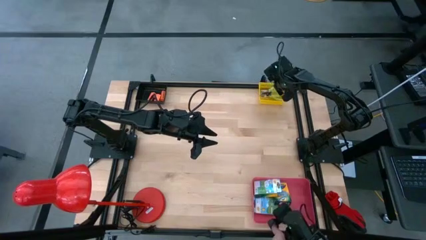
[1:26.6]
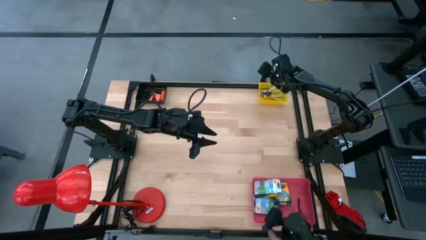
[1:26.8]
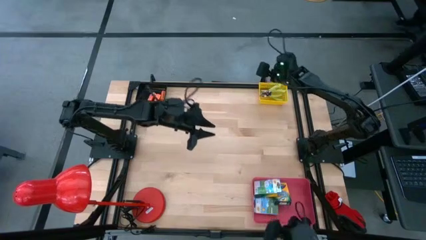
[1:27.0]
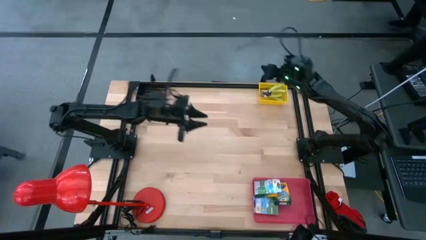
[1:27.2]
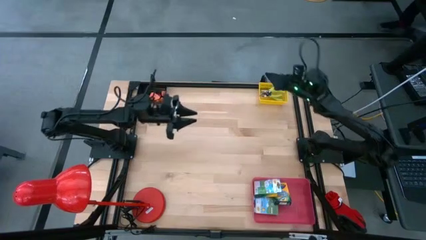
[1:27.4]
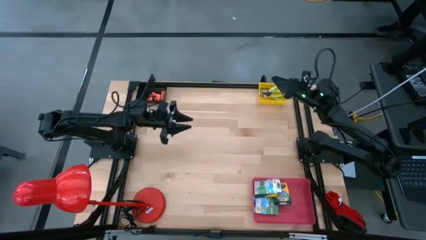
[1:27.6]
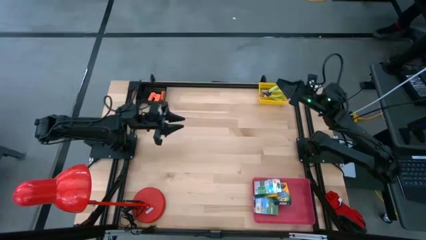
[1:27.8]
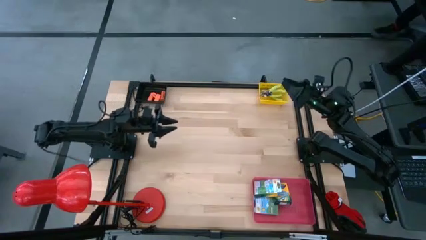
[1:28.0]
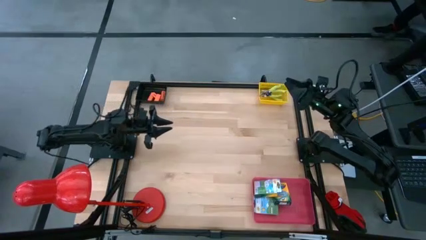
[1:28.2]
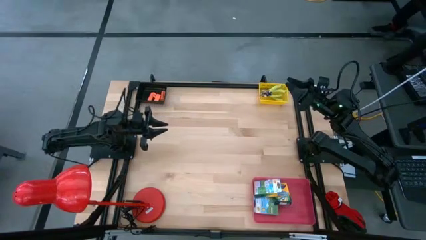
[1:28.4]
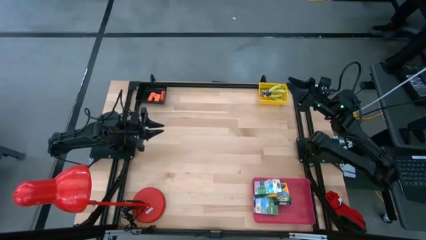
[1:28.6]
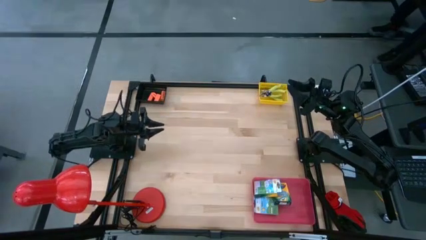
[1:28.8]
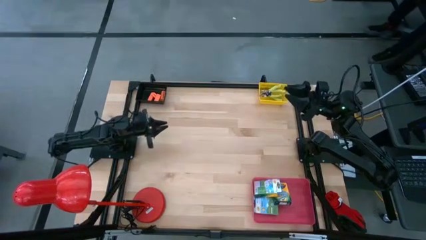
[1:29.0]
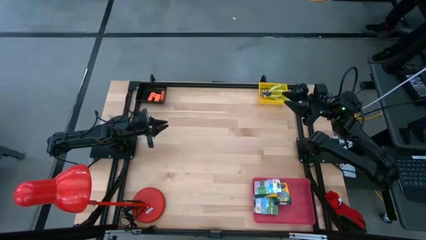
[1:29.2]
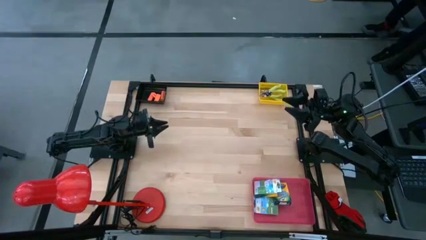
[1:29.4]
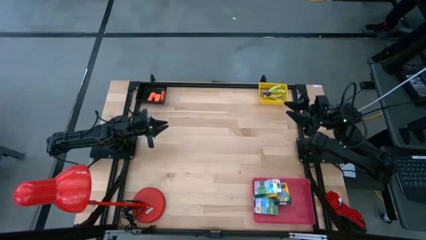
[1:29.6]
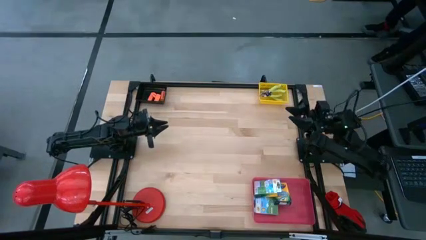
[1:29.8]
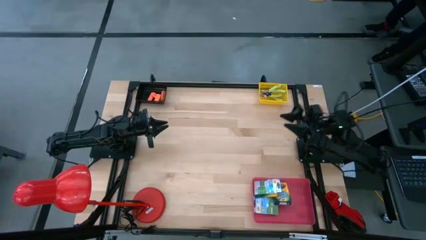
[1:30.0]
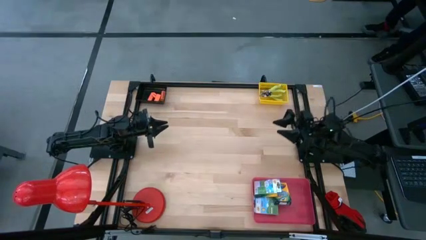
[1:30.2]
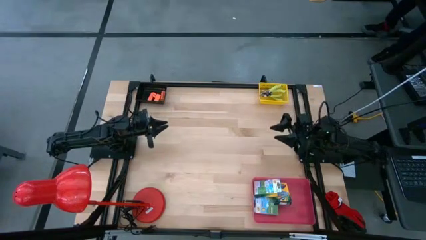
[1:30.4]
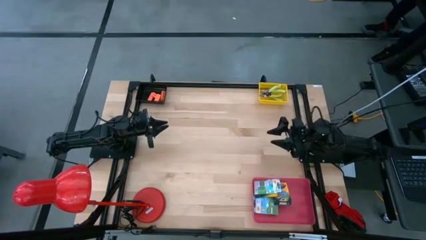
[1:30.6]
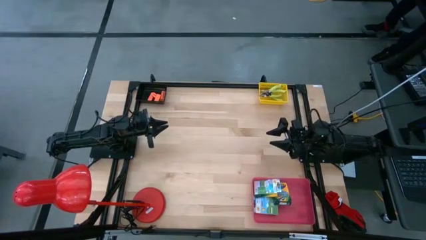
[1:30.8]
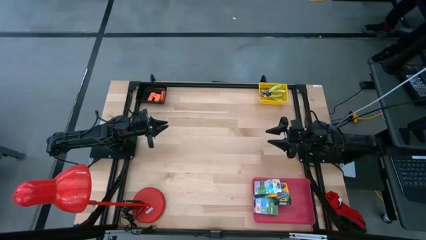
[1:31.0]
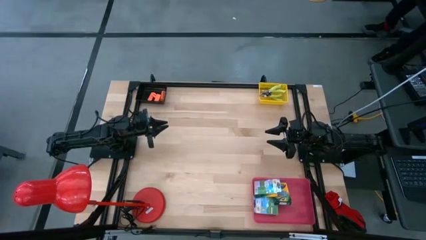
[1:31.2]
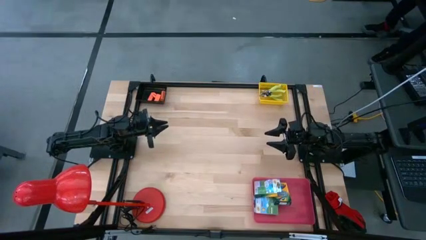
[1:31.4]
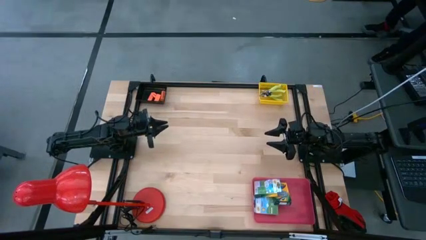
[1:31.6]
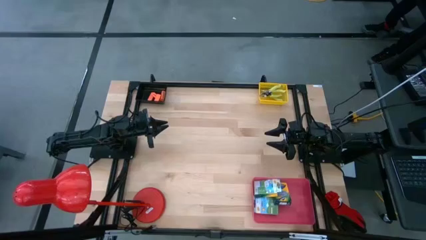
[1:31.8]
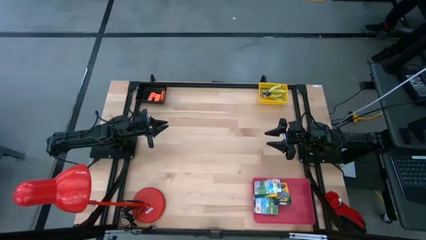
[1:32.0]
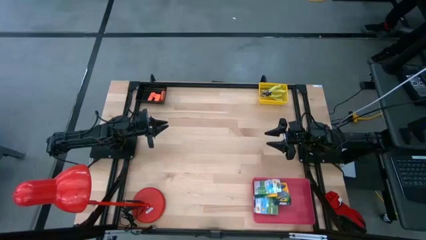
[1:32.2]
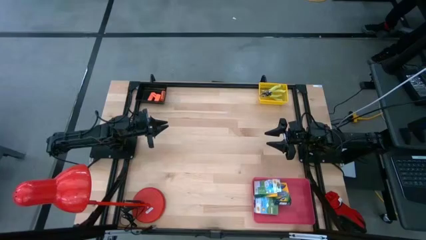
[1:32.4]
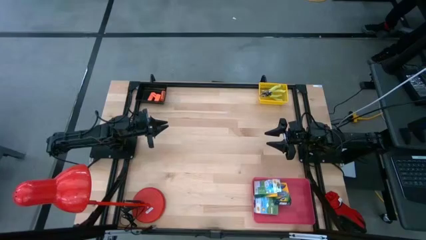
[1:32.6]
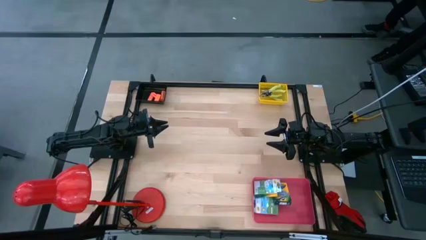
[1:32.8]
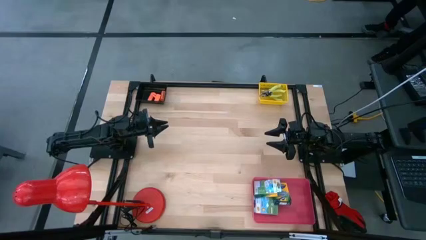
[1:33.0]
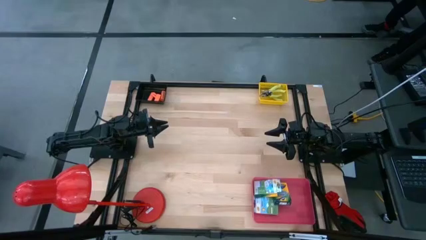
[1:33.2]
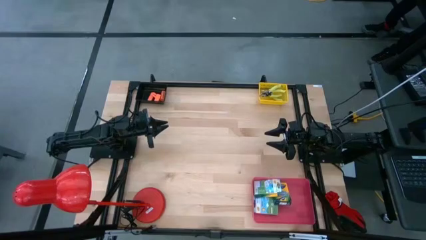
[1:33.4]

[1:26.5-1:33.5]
Task: Pick & Place School Supplies
Return to Home Position

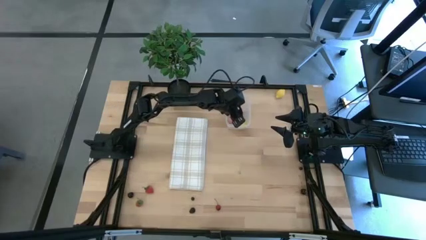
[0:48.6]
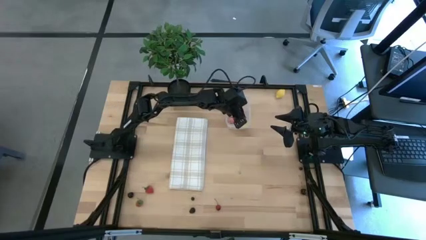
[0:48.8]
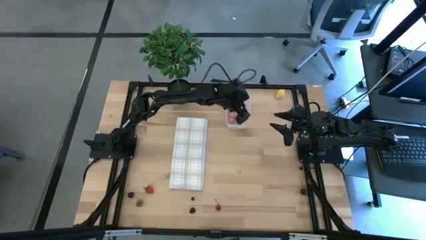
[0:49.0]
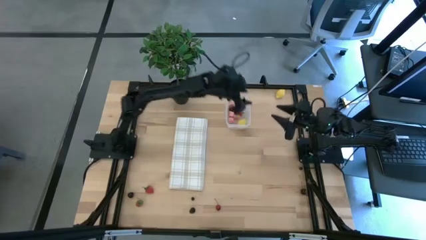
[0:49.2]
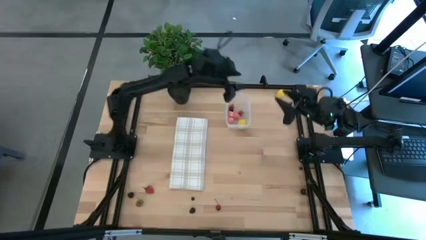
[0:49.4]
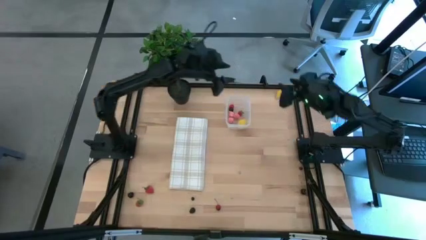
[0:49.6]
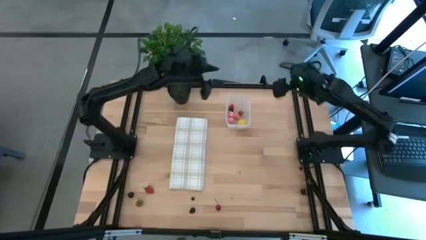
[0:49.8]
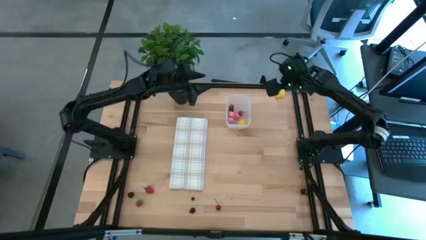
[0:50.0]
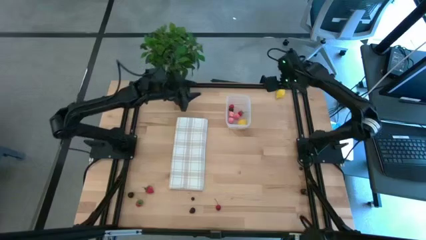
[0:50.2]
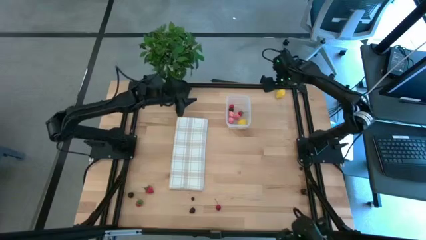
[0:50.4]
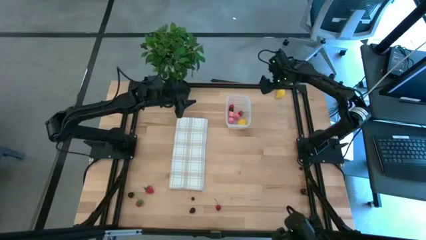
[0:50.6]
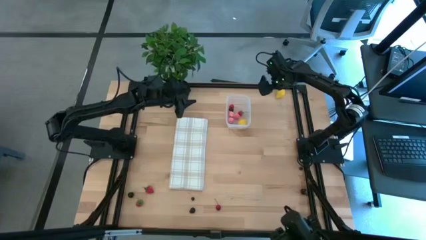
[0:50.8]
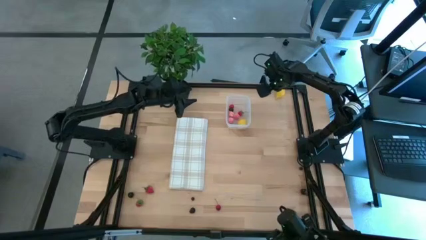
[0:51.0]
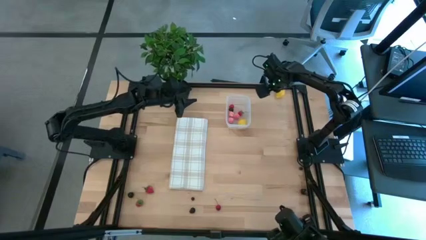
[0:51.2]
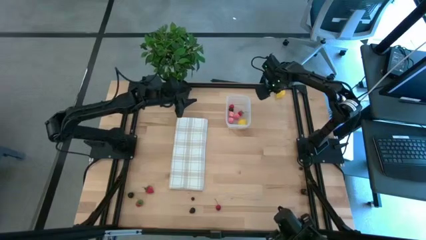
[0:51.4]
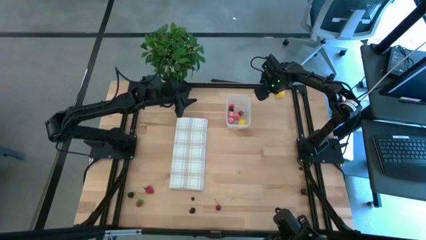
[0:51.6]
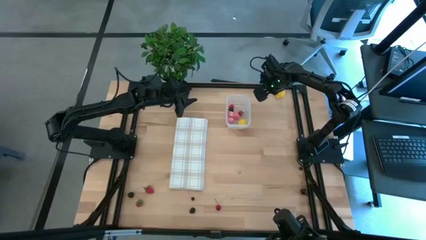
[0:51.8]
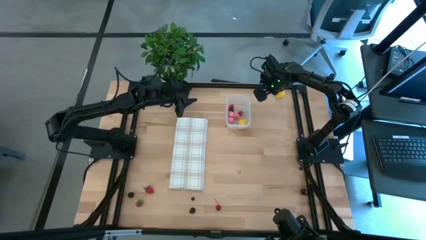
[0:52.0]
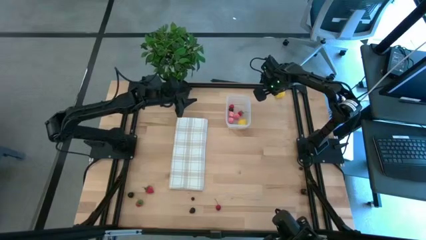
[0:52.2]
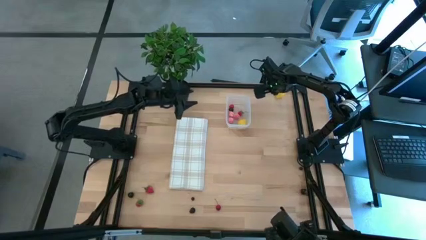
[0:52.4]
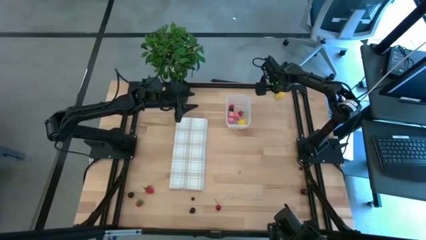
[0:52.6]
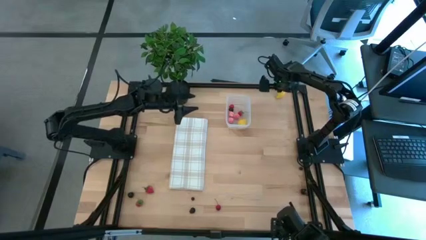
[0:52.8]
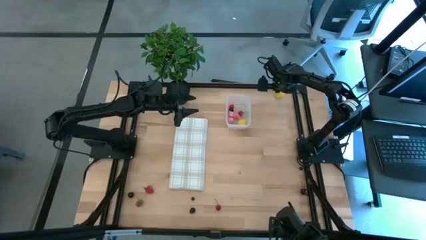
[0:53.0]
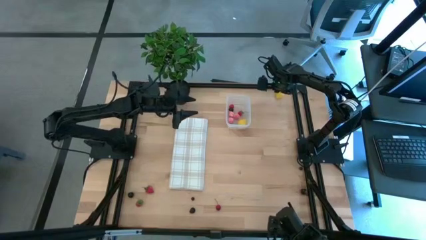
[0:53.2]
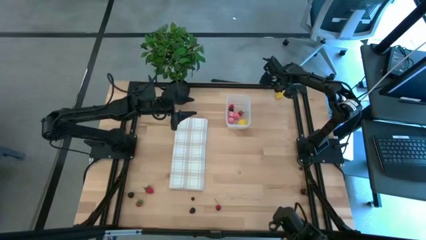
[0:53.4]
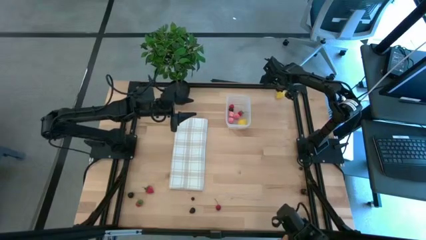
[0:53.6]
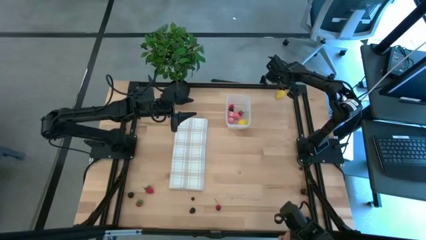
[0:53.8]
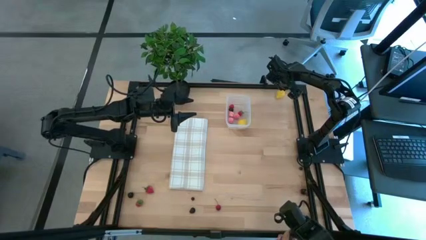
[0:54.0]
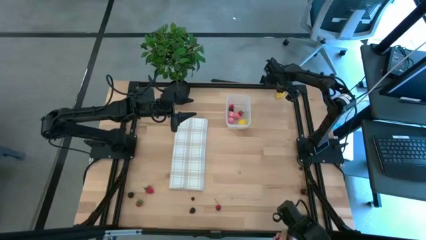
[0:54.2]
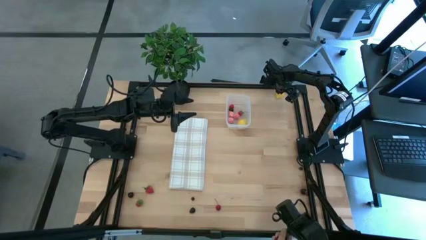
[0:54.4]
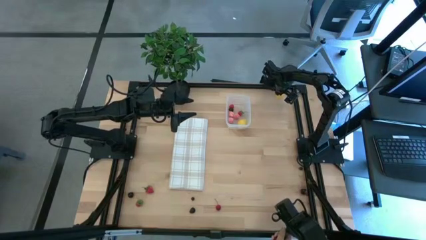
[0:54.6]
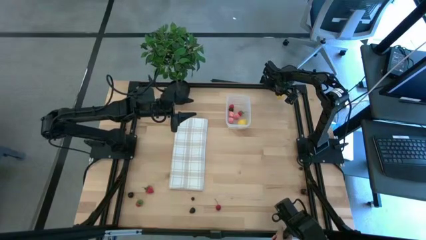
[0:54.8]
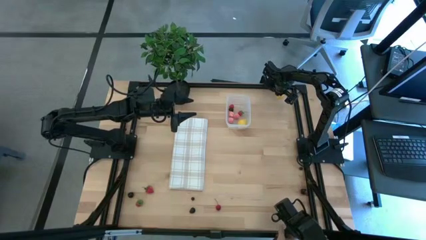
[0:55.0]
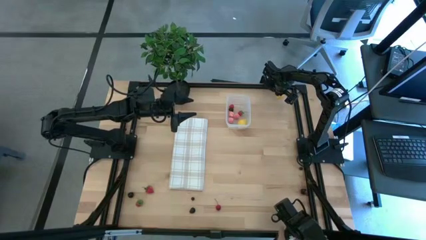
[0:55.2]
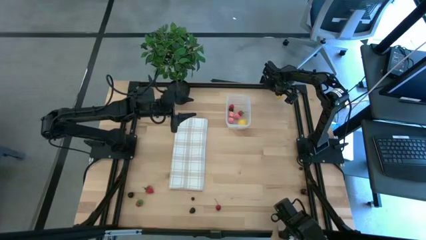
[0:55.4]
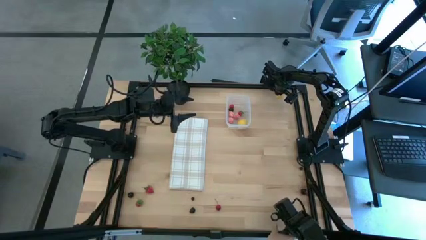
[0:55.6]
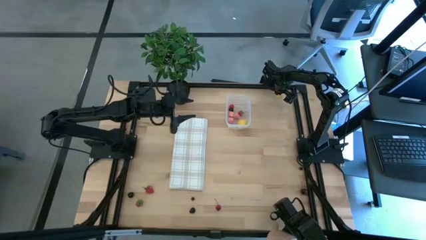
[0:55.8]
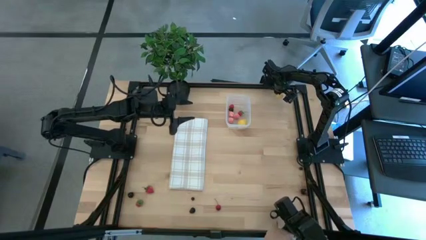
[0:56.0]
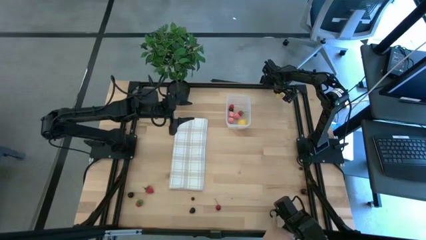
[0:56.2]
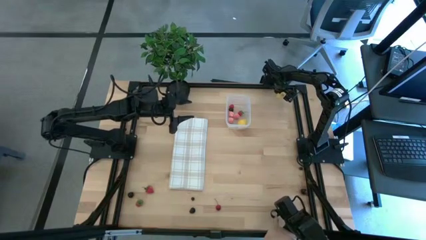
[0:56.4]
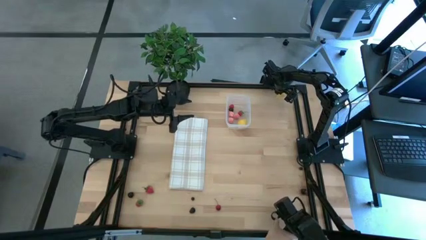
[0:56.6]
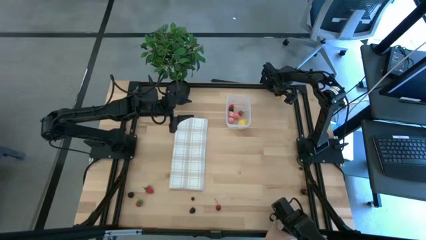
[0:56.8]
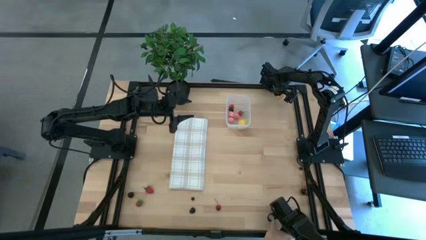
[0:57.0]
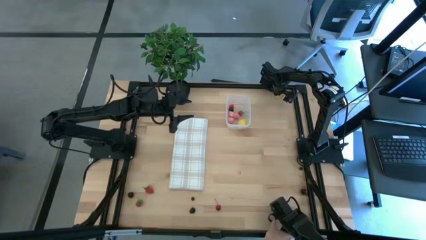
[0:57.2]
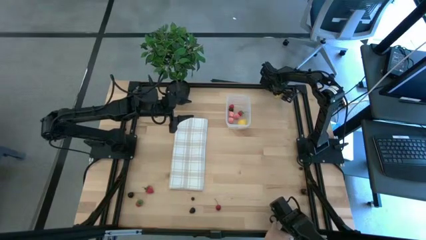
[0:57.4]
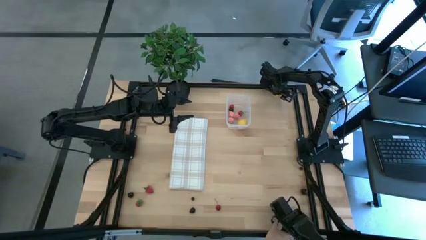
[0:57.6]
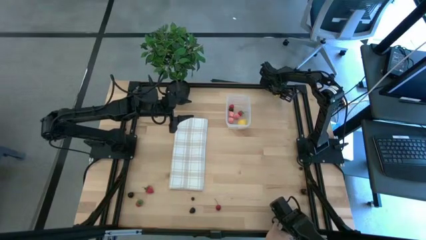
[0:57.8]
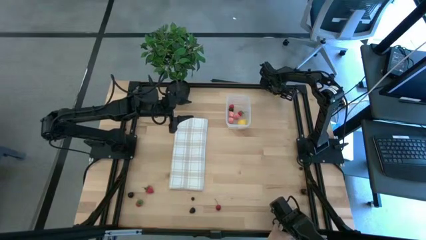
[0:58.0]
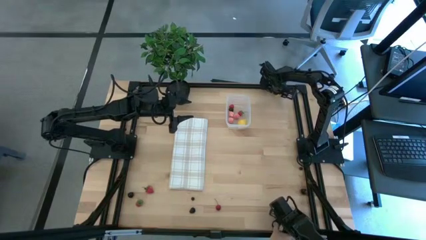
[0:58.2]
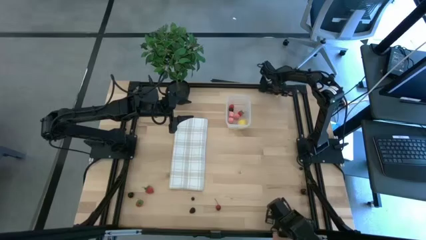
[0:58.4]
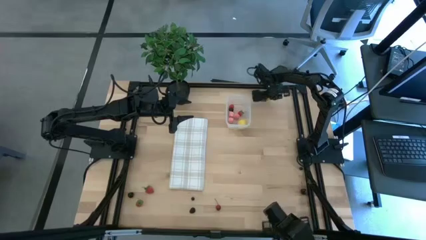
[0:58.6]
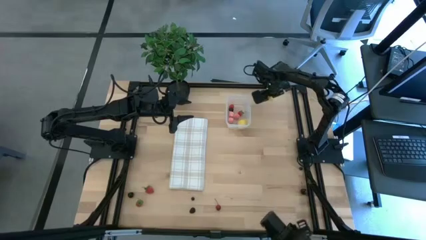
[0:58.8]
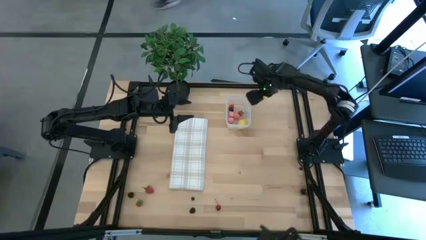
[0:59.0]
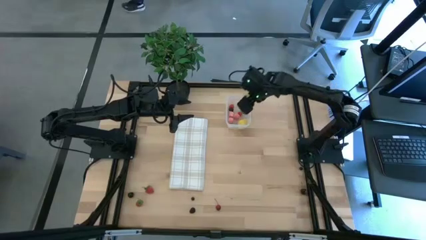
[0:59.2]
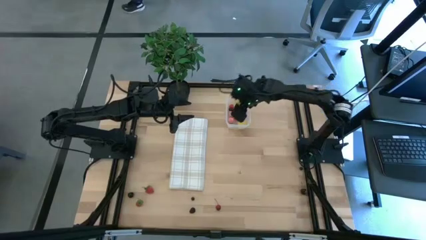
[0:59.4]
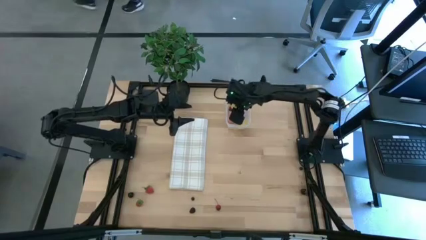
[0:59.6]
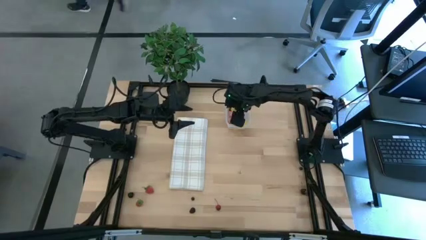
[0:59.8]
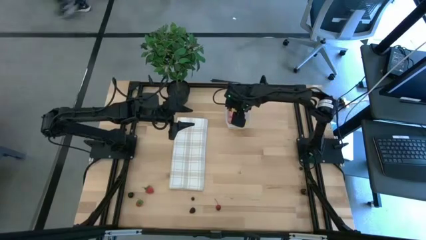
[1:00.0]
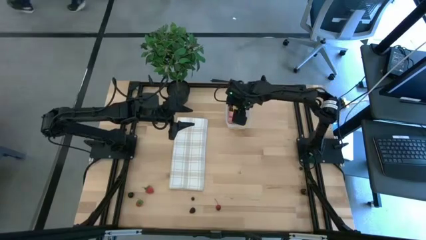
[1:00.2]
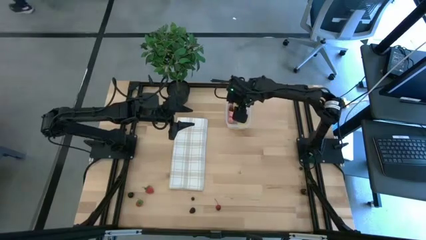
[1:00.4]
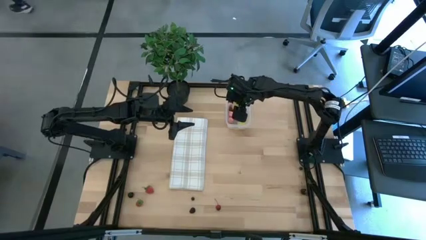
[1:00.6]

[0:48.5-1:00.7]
Task: Pick and placing Produce into tupperware
Put the lemon into the transparent bin
